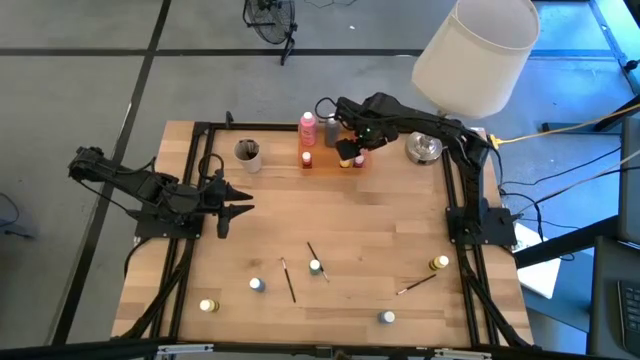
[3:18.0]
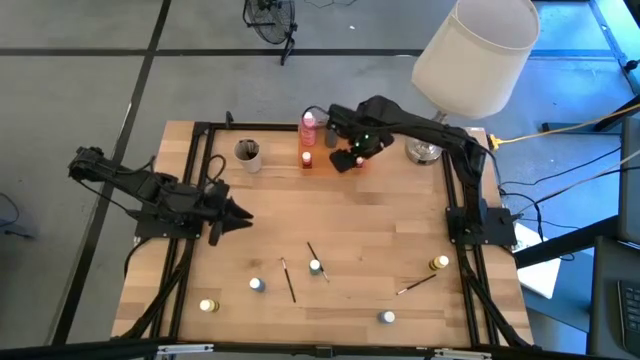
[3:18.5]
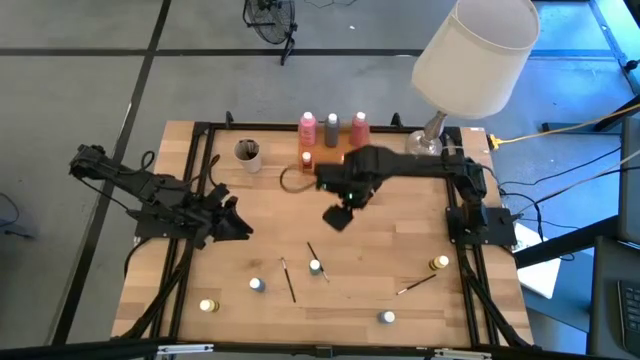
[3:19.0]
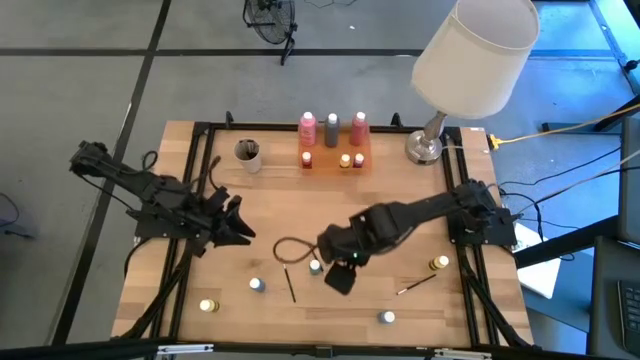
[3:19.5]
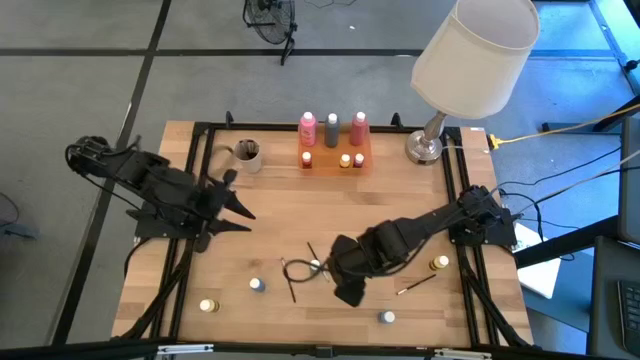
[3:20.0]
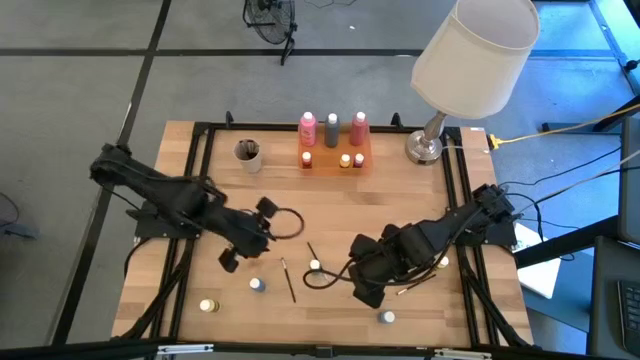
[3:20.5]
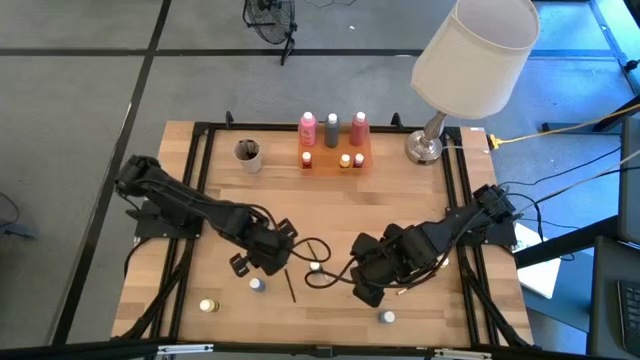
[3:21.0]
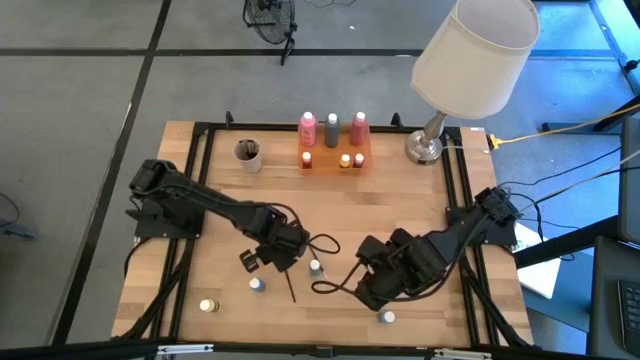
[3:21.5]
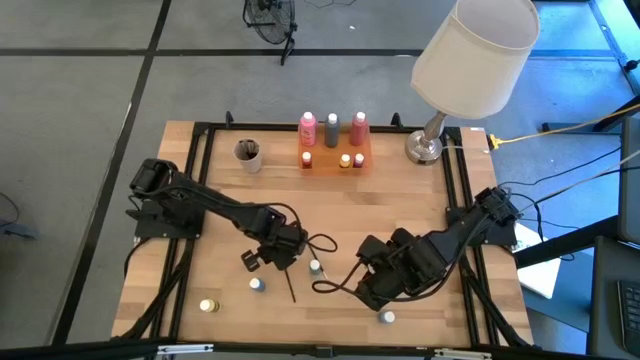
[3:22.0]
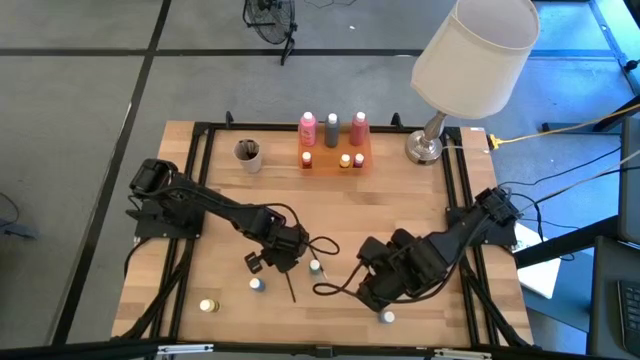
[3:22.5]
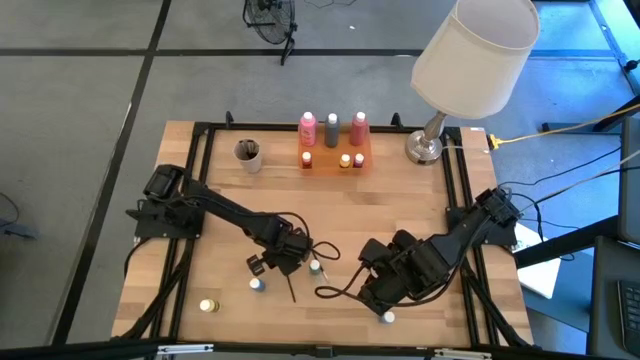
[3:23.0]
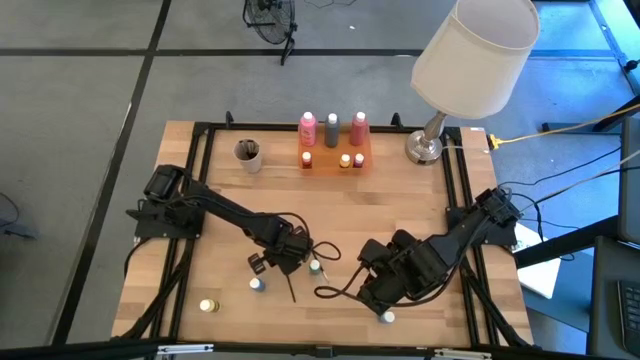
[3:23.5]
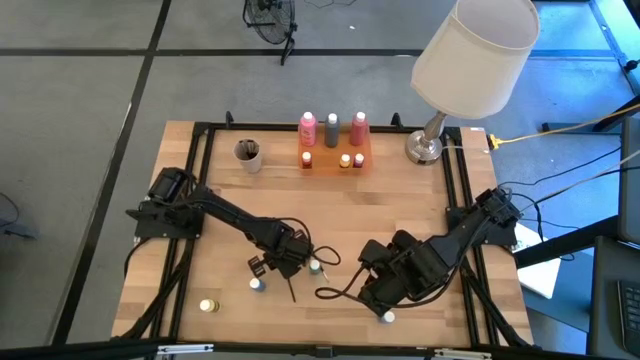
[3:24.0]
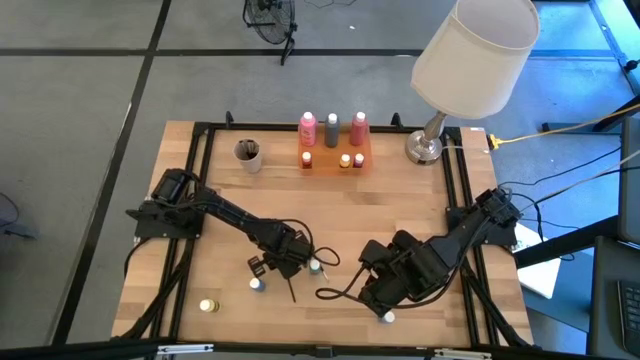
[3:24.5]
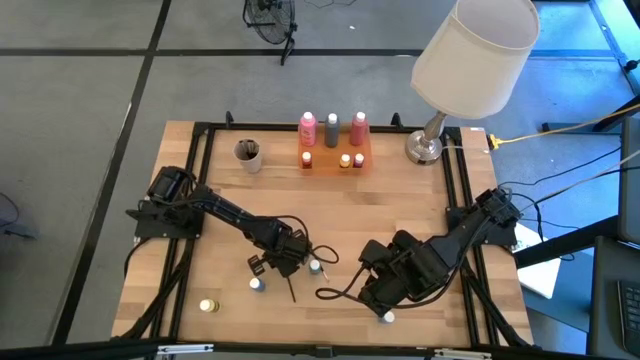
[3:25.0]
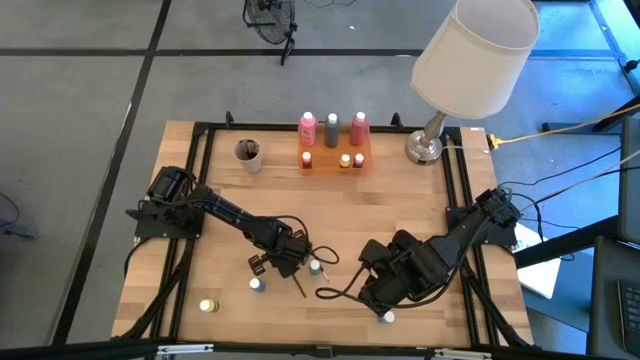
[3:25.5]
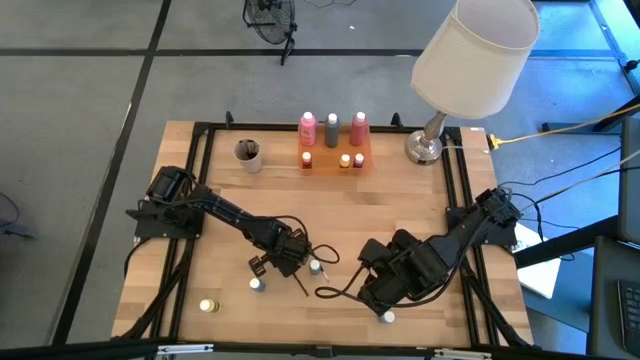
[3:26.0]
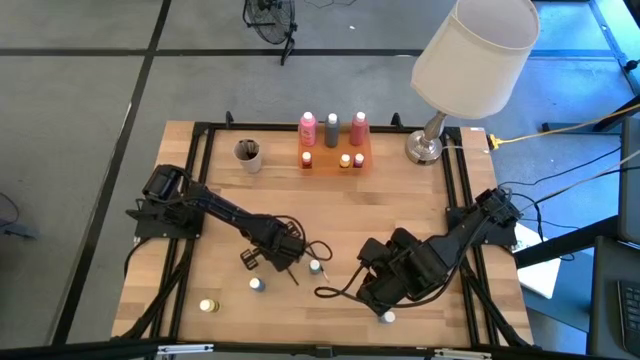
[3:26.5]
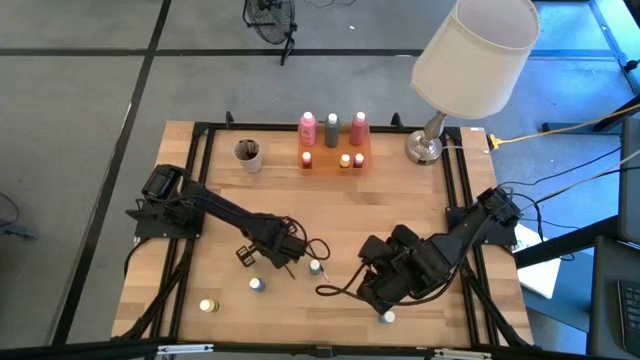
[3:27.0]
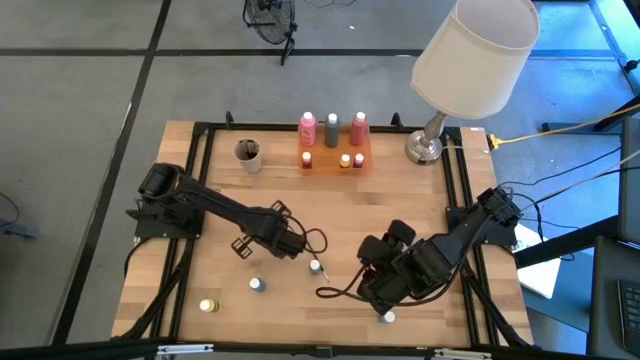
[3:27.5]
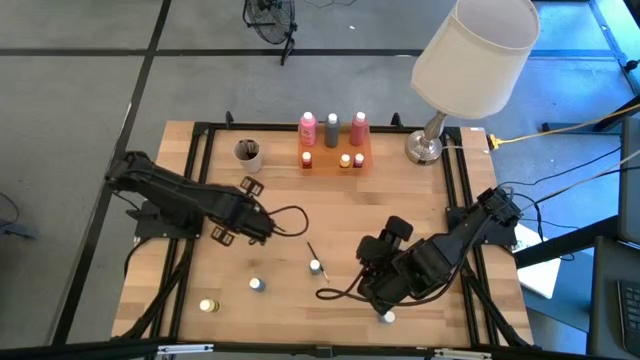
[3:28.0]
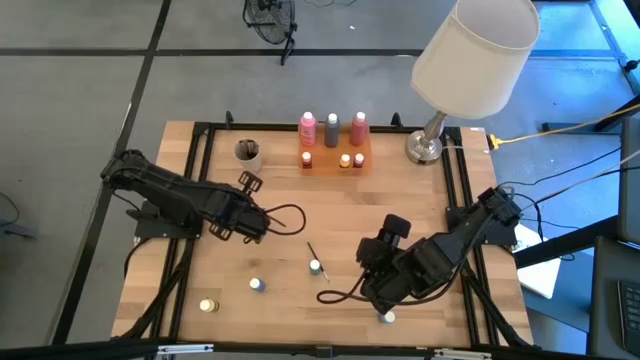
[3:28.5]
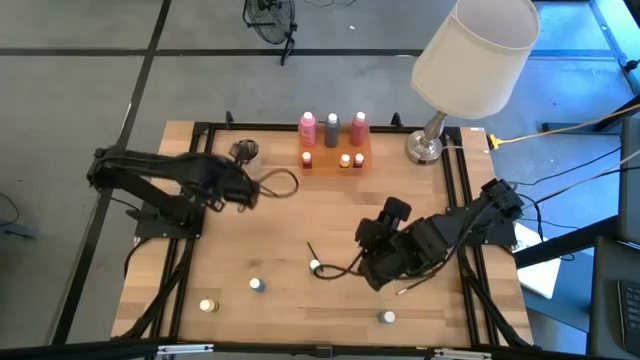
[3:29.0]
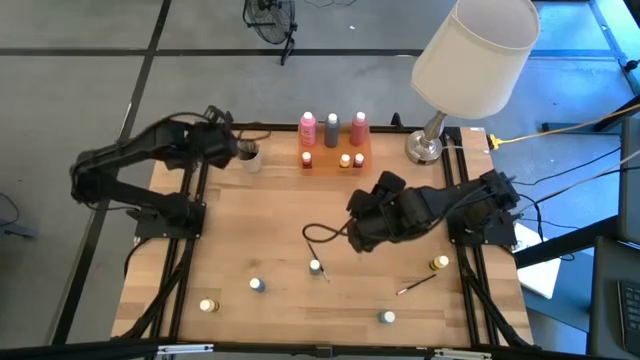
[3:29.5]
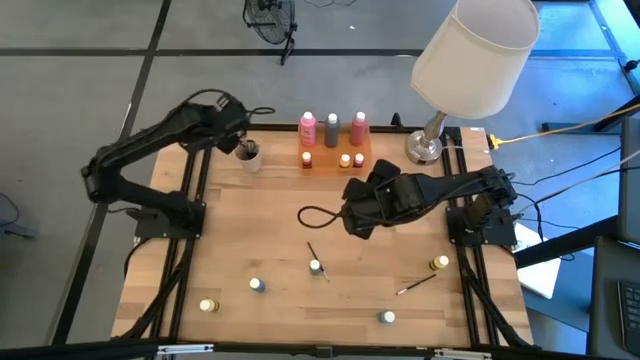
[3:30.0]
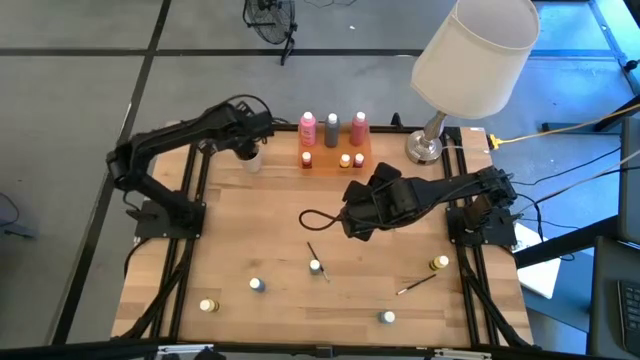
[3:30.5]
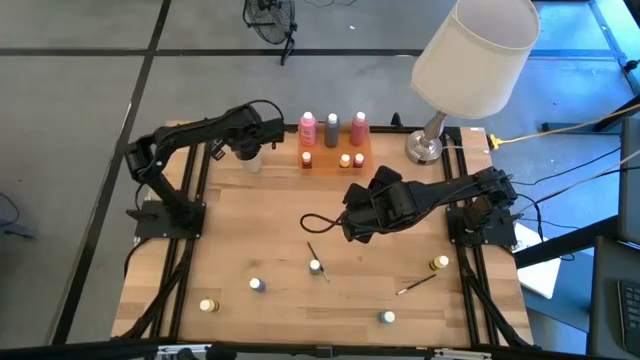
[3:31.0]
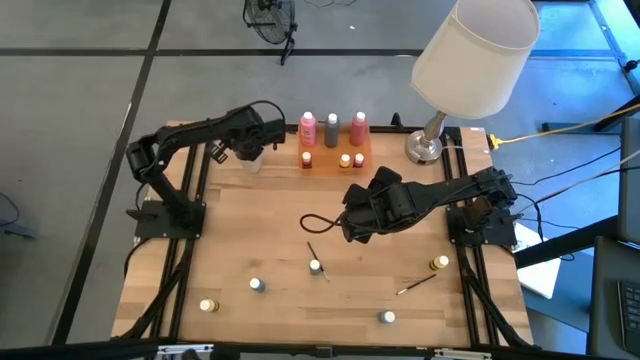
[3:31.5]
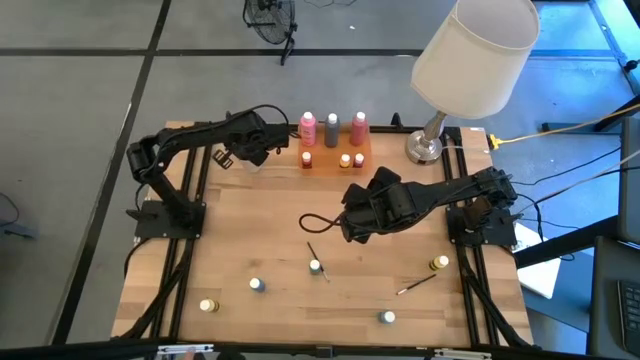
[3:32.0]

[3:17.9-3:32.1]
Task: Pick & Place Paint Supplies
Put the silver paint brush into the white cup

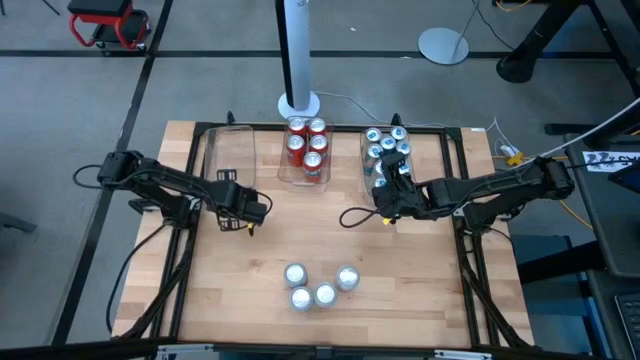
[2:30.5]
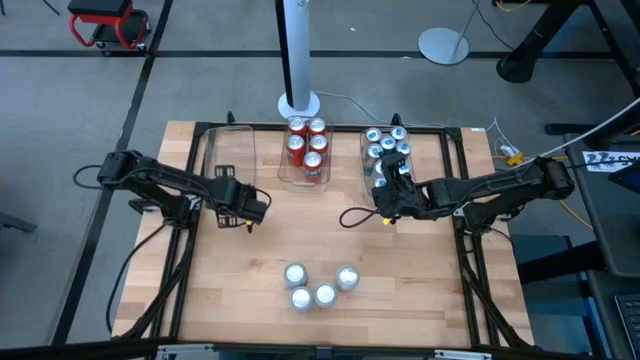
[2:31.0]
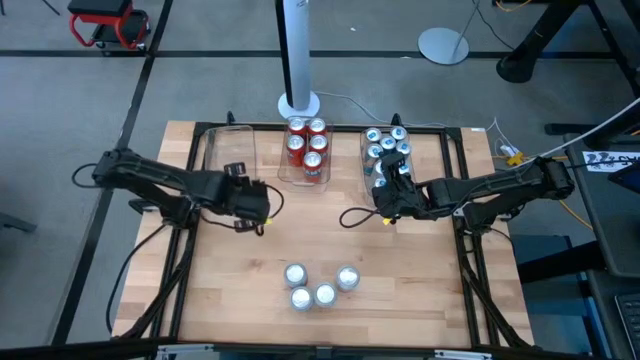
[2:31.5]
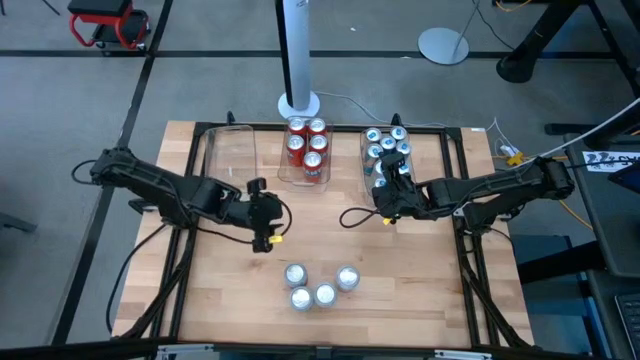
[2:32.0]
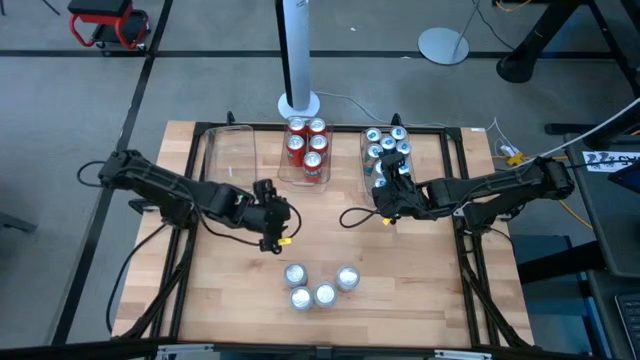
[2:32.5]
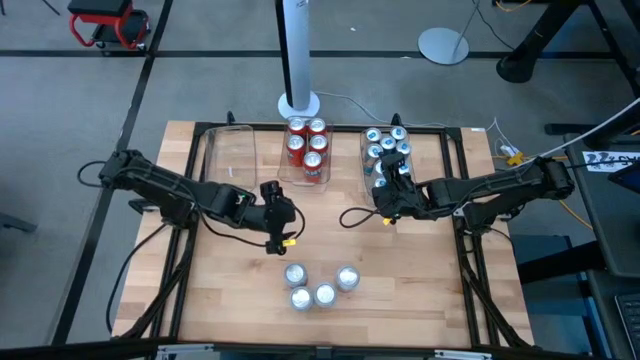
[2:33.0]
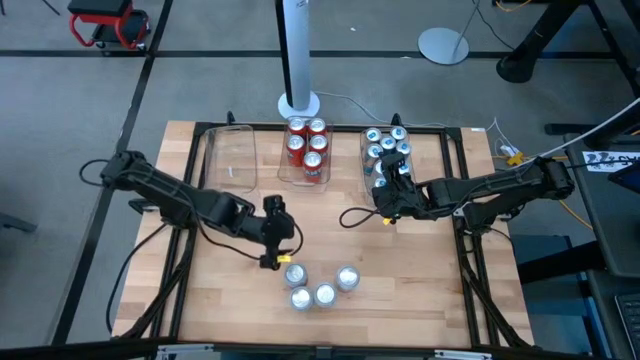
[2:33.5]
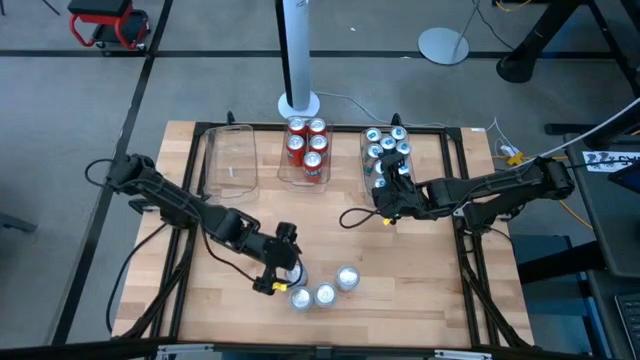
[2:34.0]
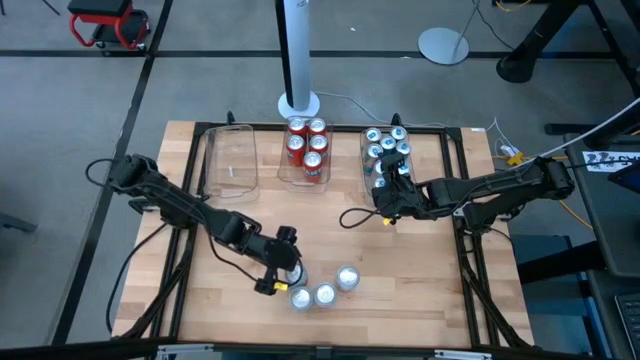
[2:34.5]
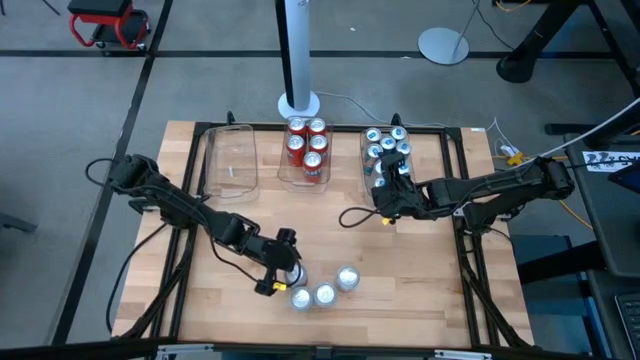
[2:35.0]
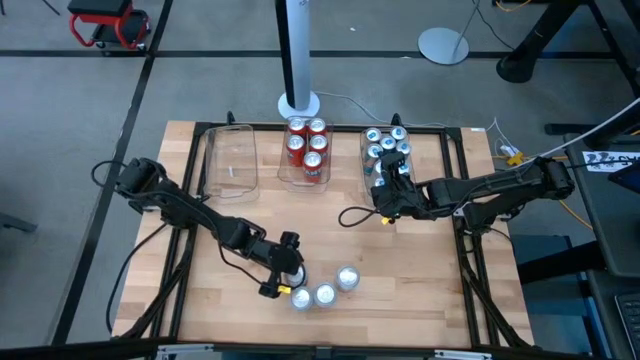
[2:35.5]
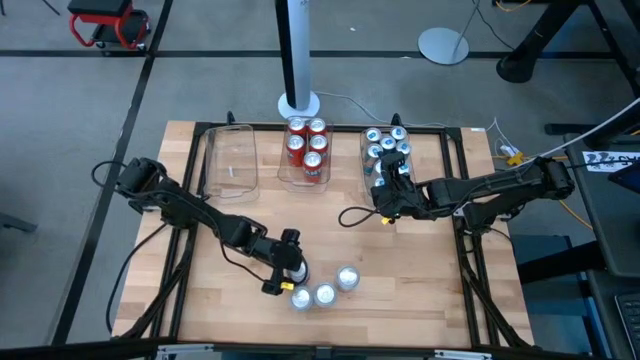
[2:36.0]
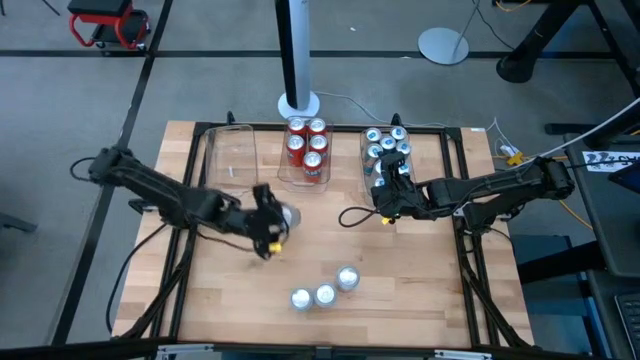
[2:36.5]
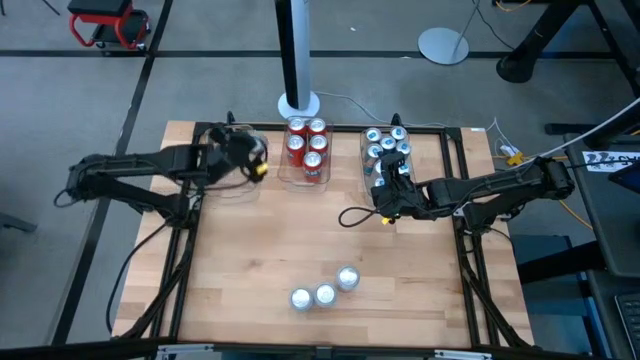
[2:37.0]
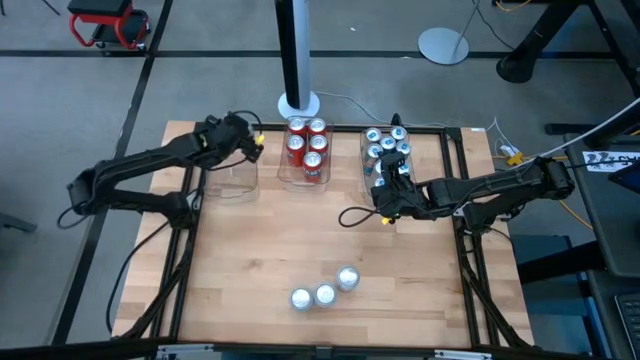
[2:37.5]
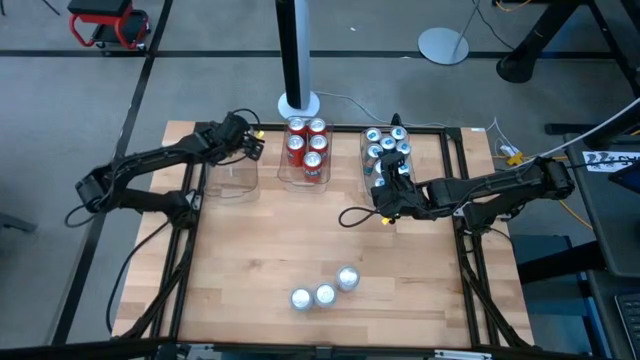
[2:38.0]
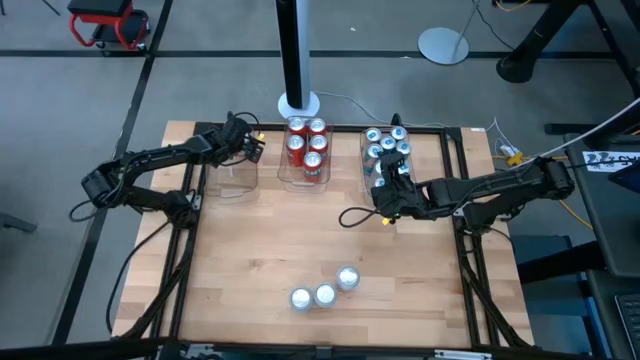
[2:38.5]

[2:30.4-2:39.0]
Task: Sort soda cans
Put the blue-white soda can into the top left transparent bin
